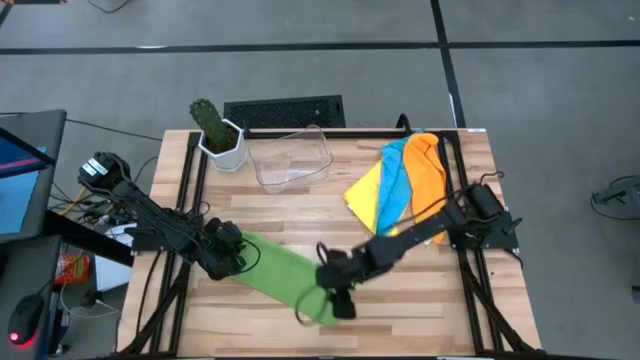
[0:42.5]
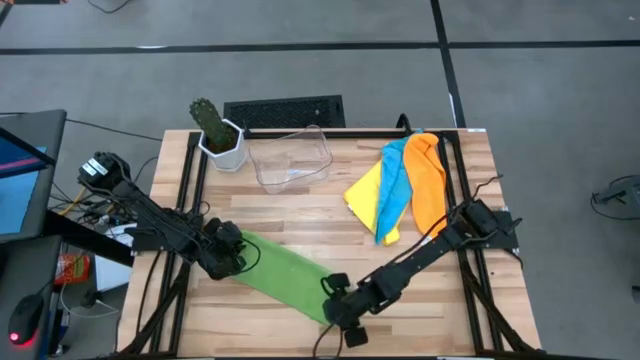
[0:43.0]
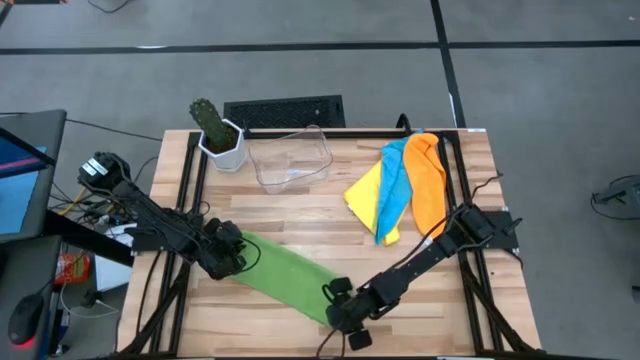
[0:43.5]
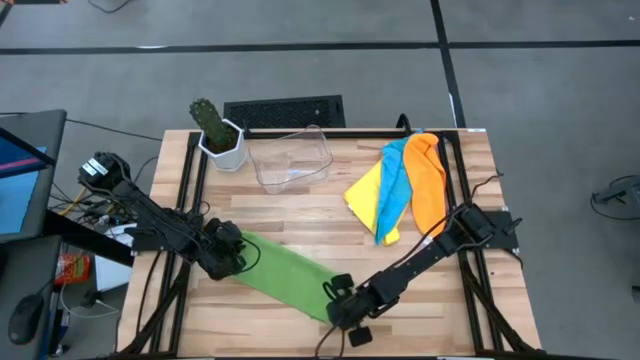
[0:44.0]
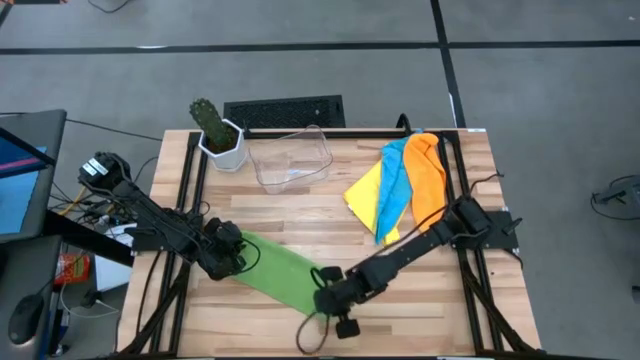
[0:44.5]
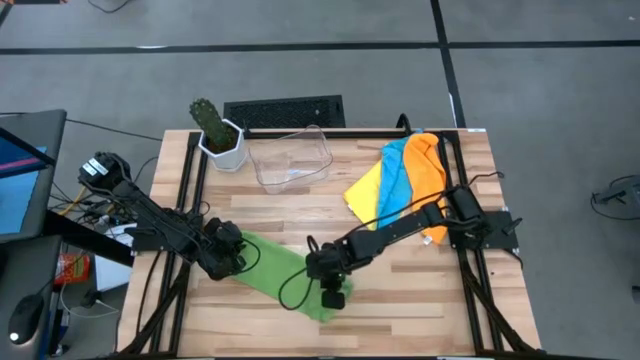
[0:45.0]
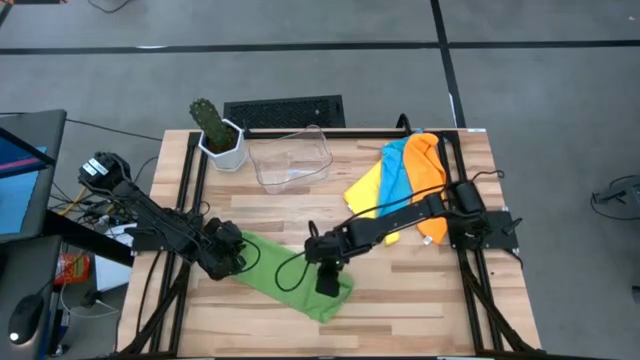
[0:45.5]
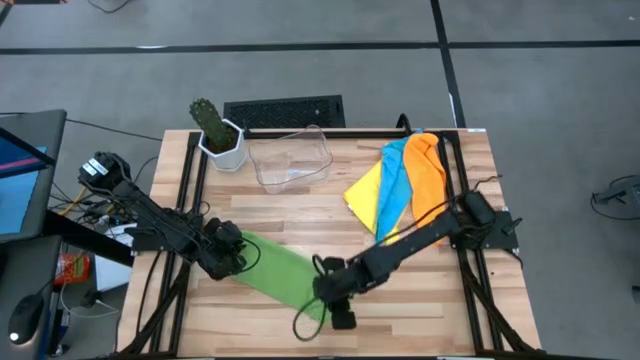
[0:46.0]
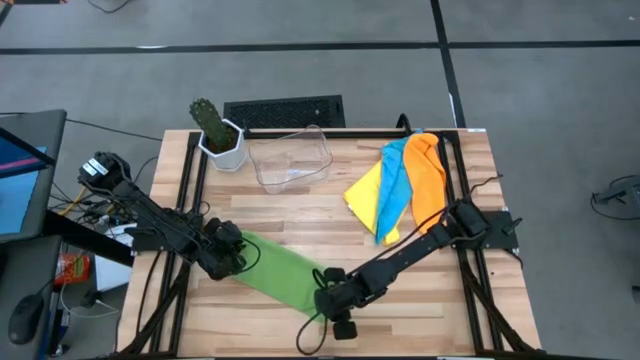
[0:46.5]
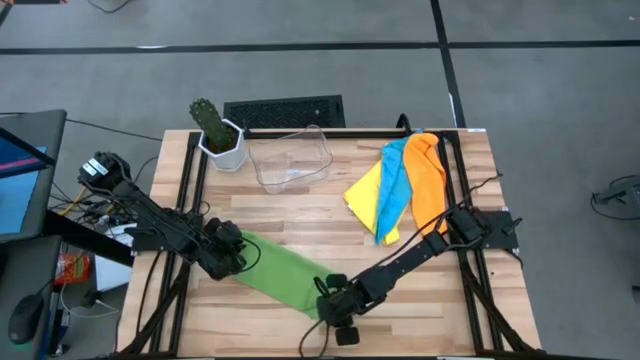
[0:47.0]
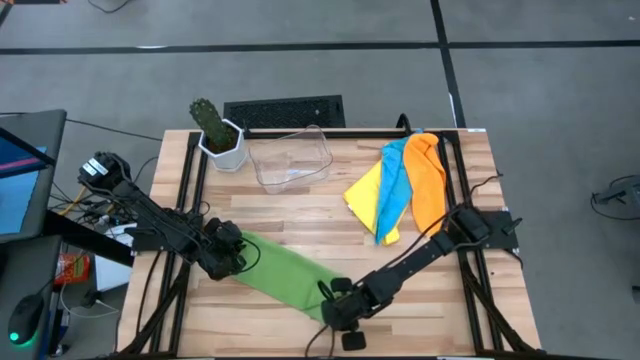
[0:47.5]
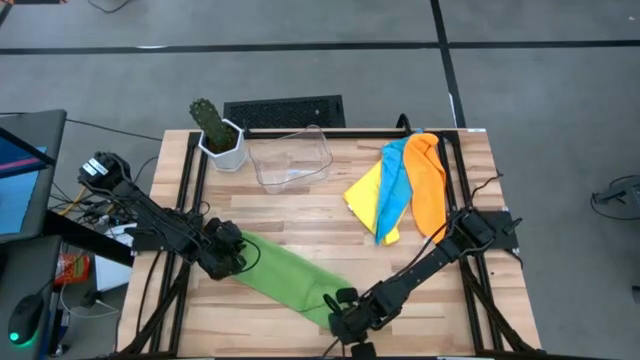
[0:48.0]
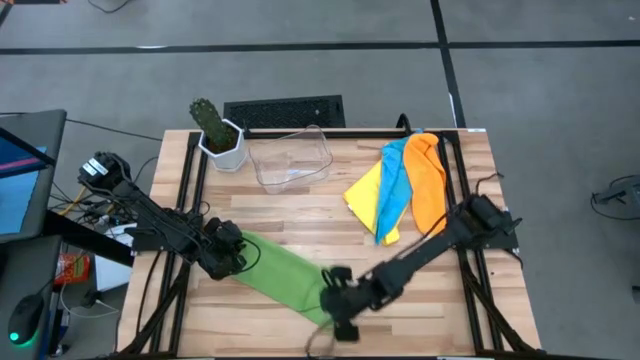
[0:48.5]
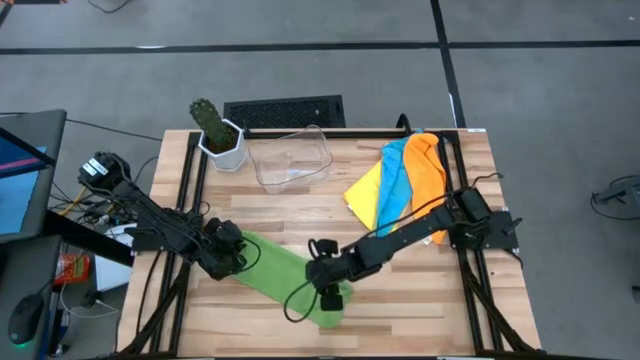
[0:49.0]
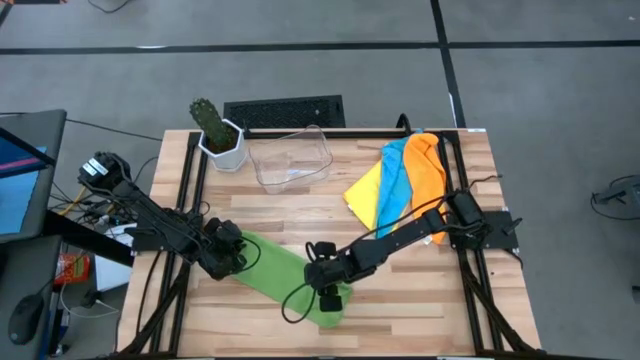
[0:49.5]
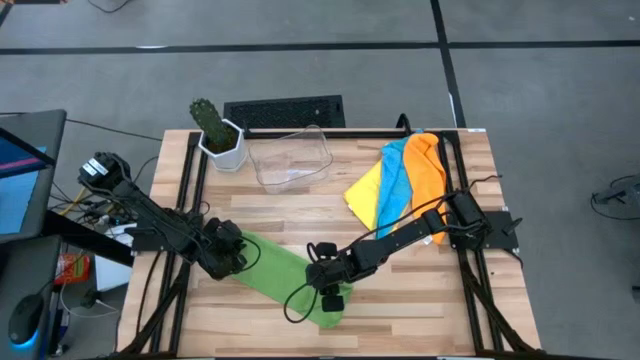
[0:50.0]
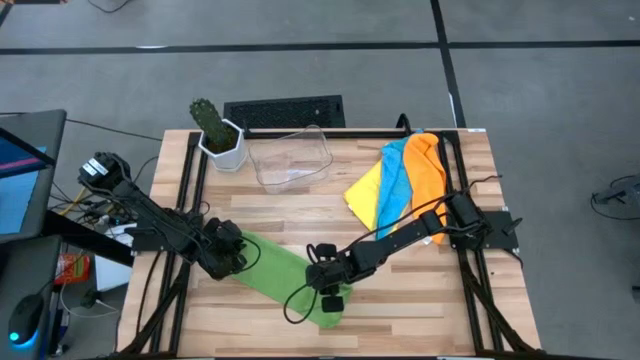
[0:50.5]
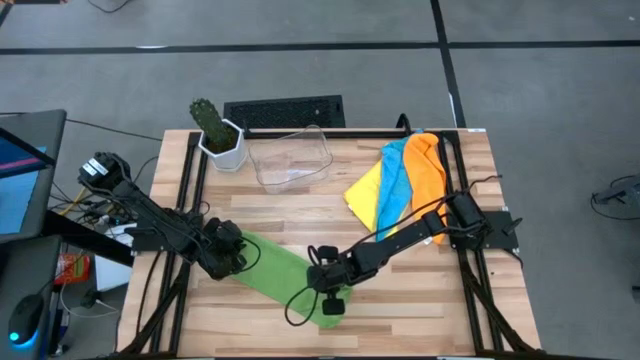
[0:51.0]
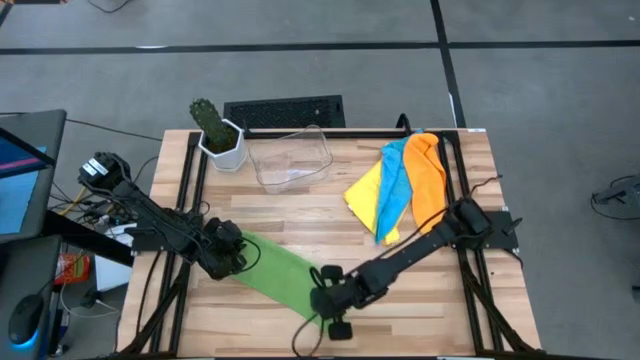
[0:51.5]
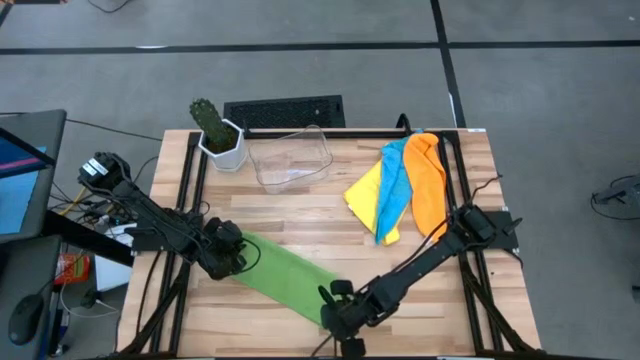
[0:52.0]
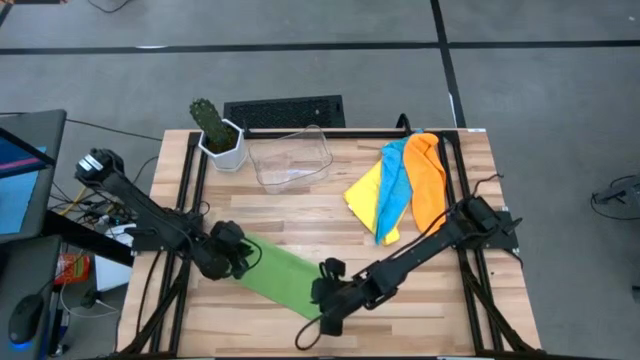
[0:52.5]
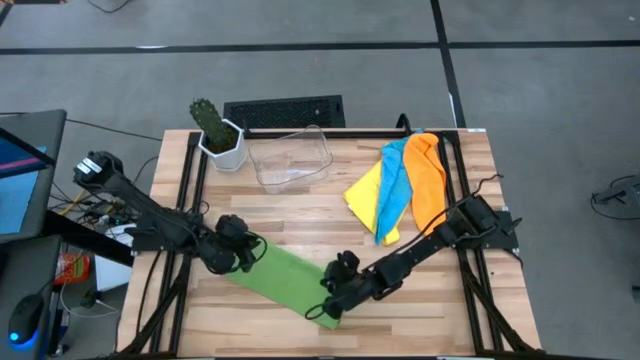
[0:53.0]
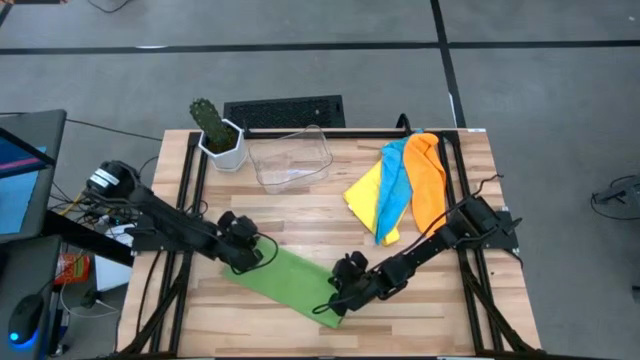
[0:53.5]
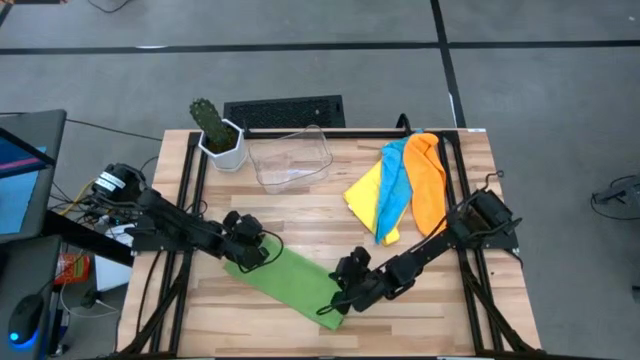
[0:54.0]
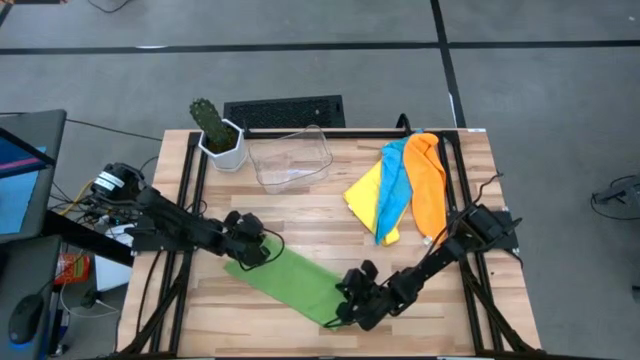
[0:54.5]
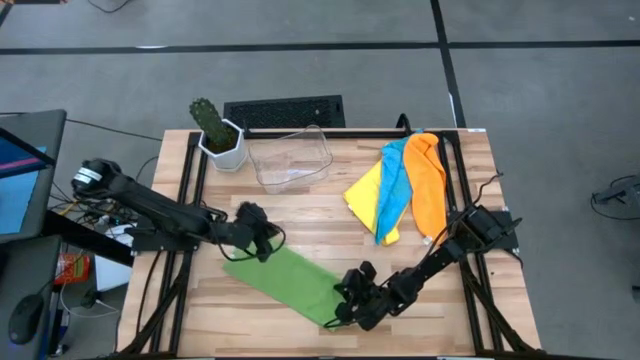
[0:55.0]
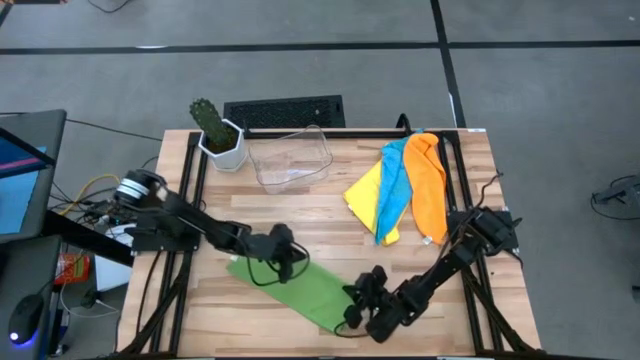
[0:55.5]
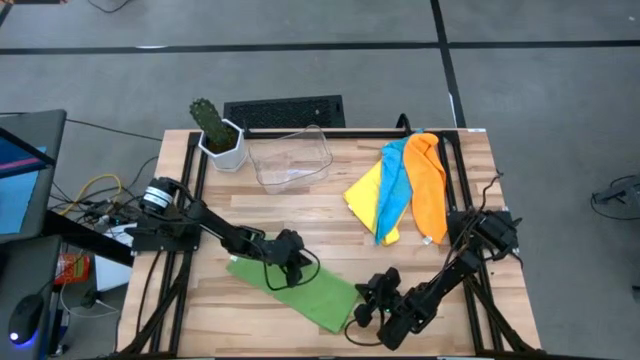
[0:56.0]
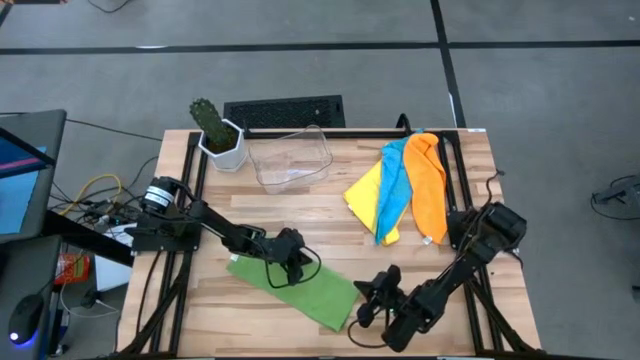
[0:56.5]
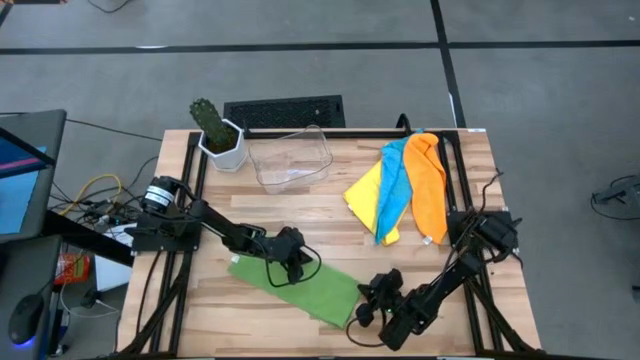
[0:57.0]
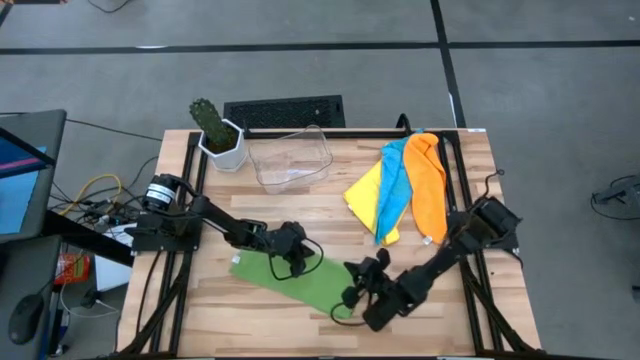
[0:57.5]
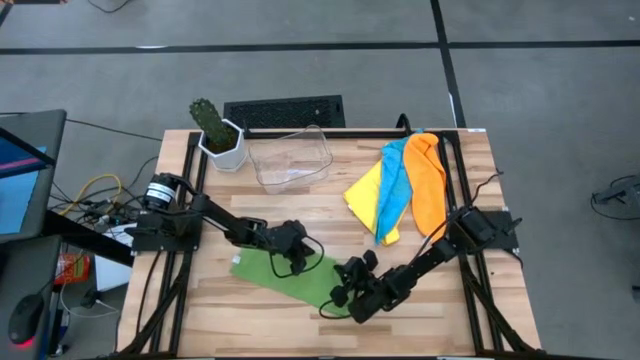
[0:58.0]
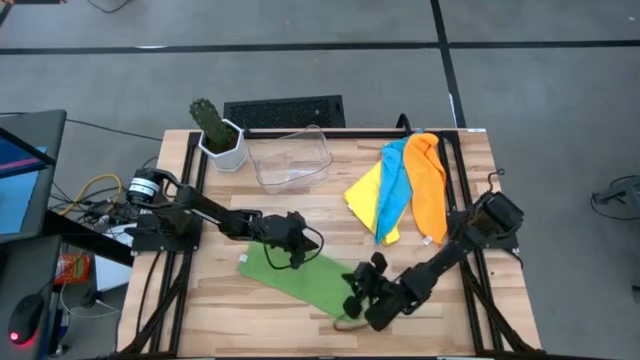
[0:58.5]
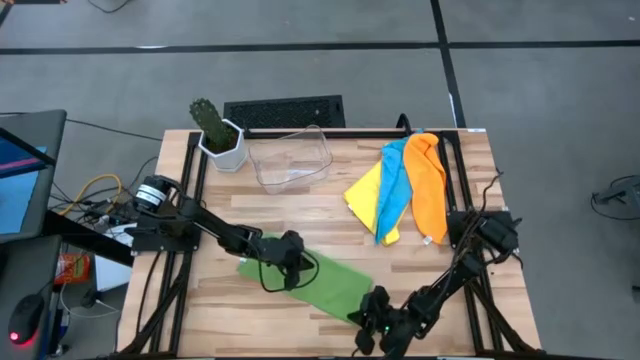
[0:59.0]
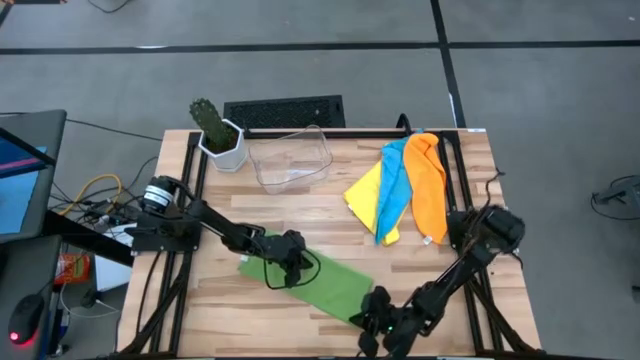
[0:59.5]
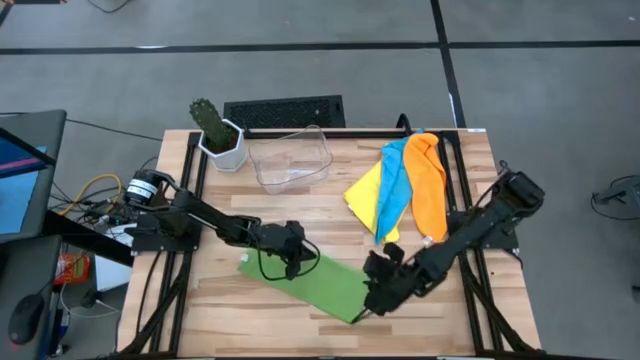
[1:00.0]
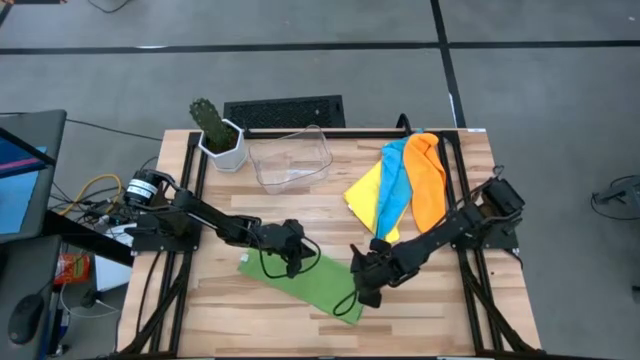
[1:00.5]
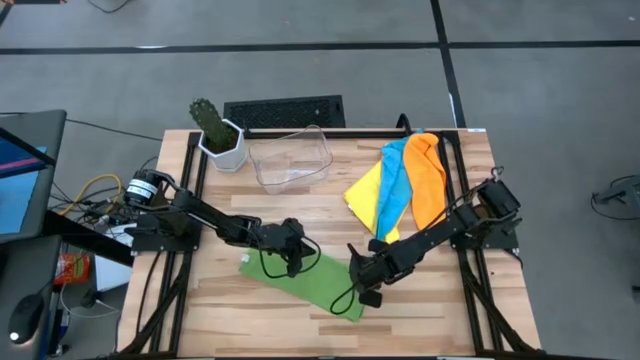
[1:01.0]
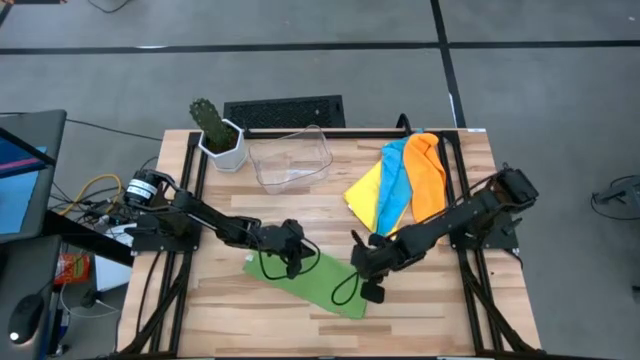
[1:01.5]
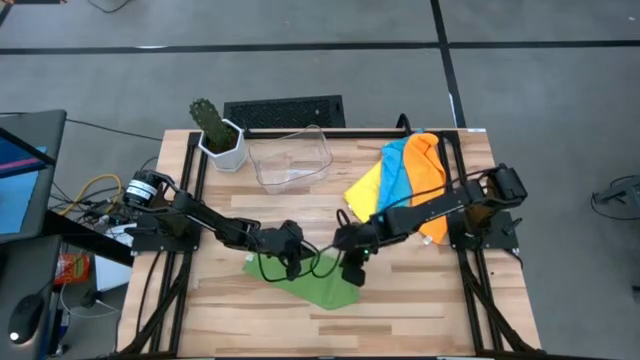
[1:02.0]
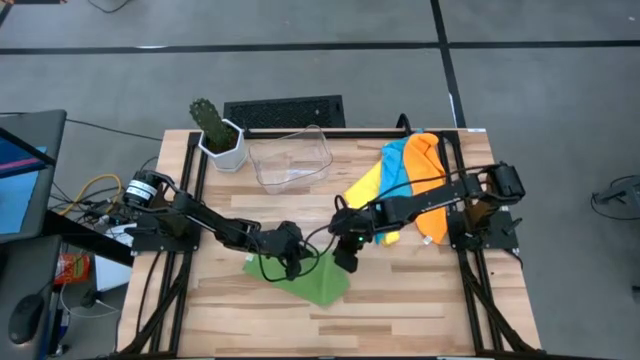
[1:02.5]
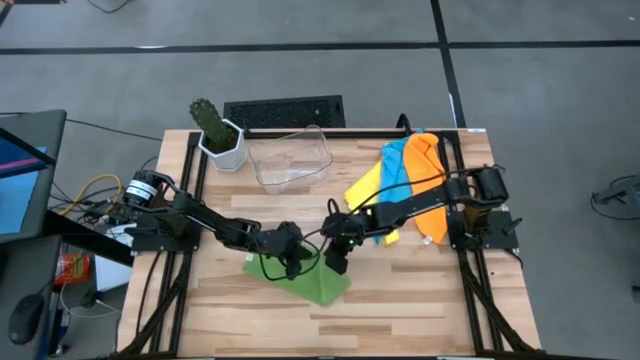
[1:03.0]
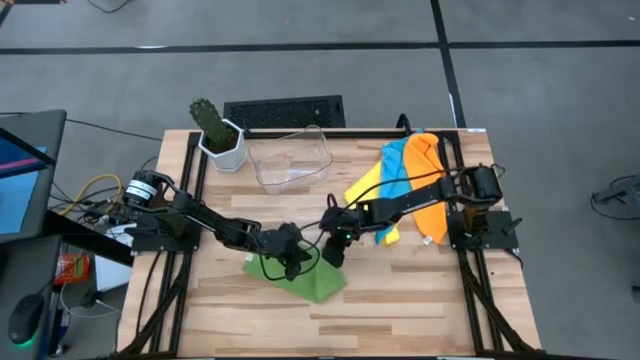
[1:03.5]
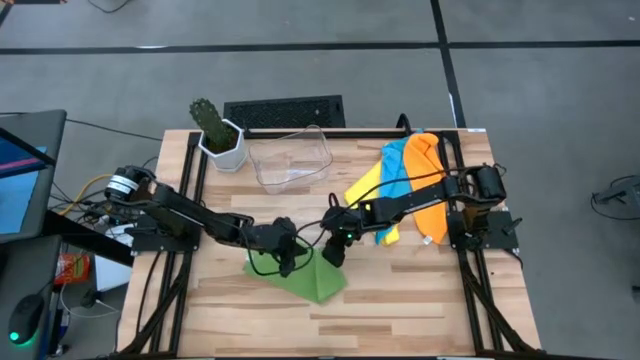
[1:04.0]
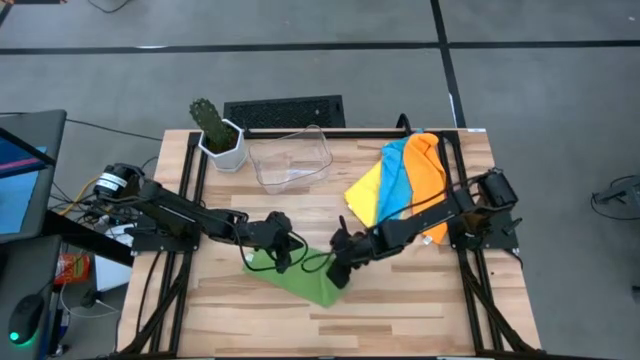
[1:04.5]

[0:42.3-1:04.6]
Task: Fold microfiber towels
Fold the green microfiber cloth
